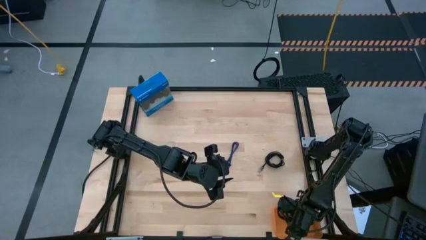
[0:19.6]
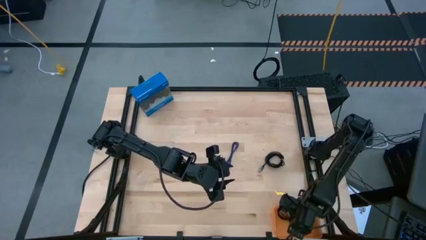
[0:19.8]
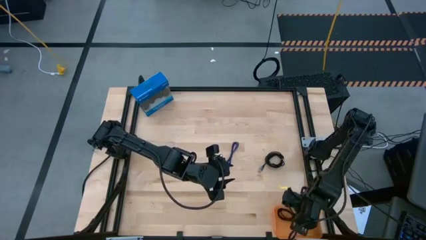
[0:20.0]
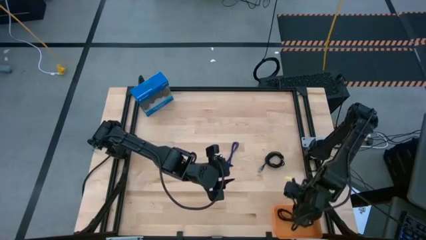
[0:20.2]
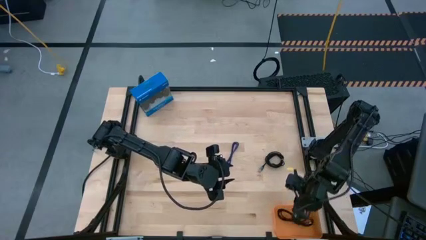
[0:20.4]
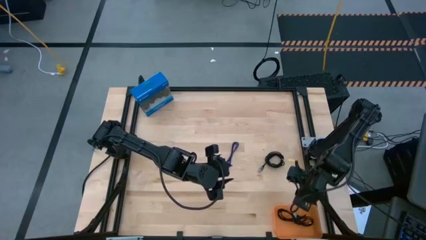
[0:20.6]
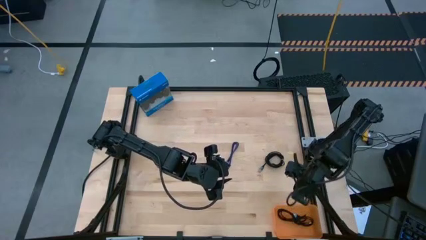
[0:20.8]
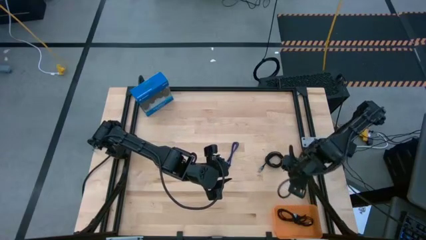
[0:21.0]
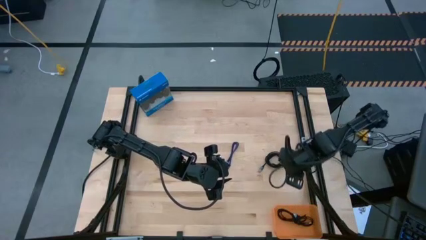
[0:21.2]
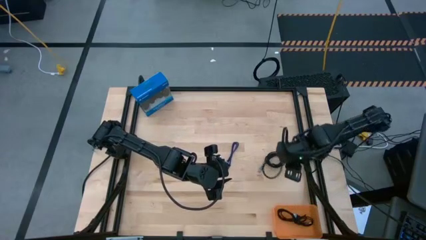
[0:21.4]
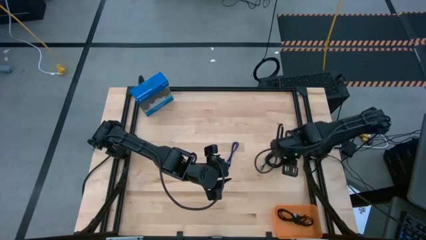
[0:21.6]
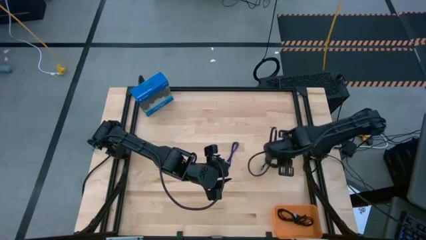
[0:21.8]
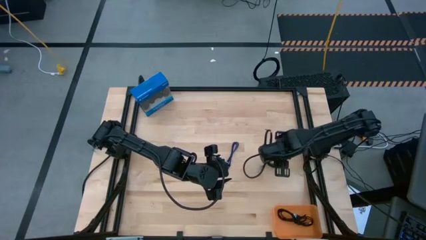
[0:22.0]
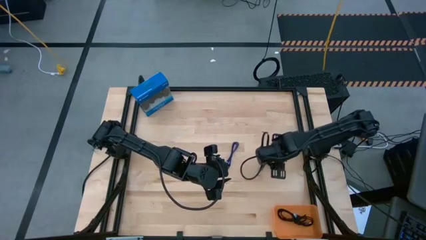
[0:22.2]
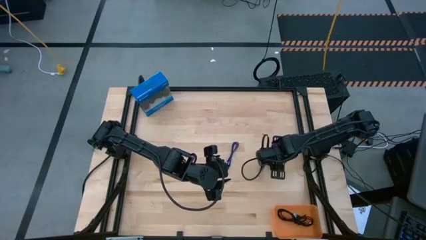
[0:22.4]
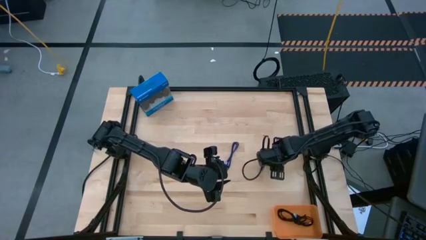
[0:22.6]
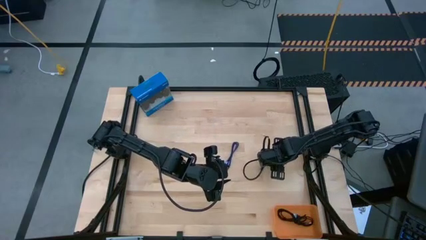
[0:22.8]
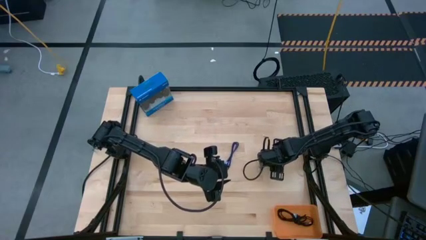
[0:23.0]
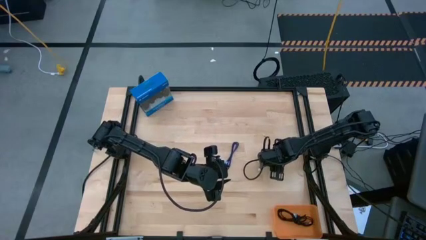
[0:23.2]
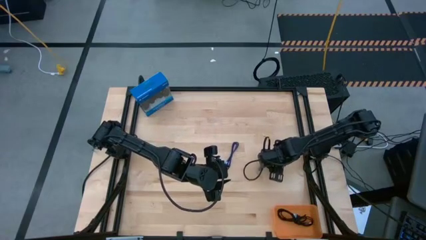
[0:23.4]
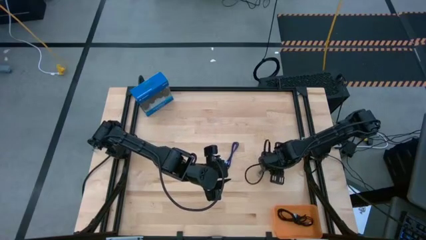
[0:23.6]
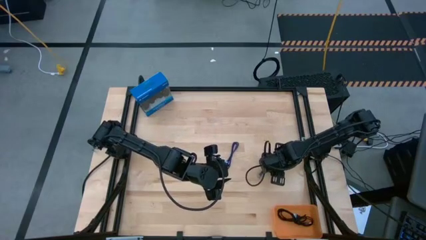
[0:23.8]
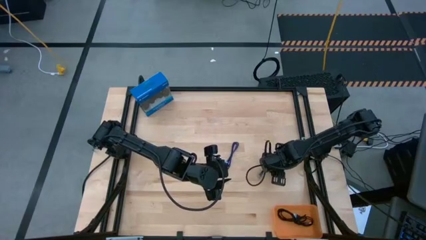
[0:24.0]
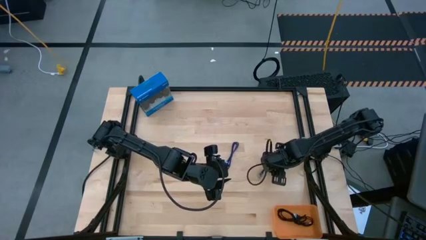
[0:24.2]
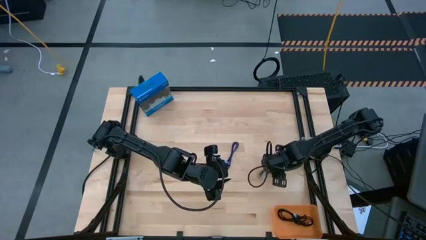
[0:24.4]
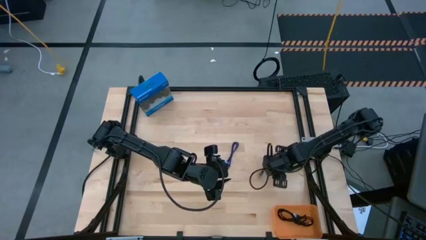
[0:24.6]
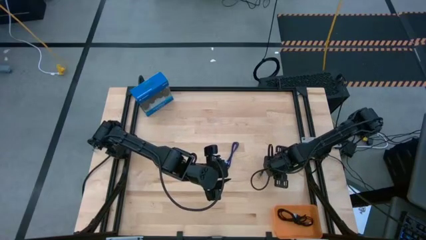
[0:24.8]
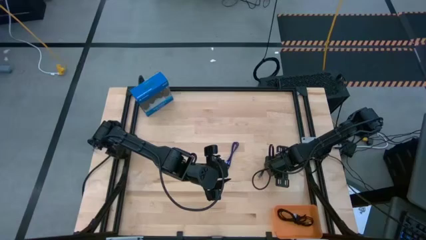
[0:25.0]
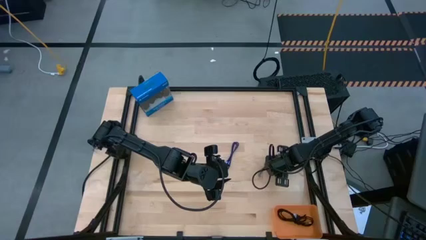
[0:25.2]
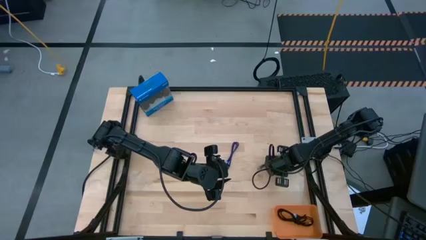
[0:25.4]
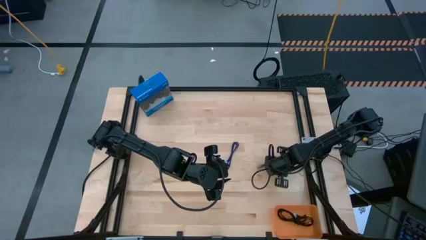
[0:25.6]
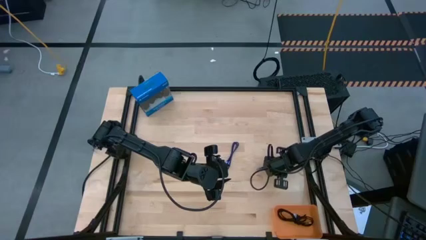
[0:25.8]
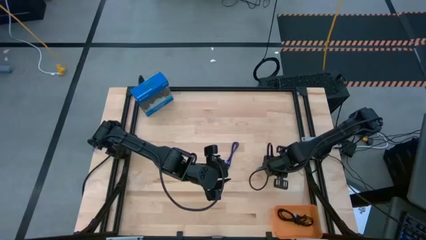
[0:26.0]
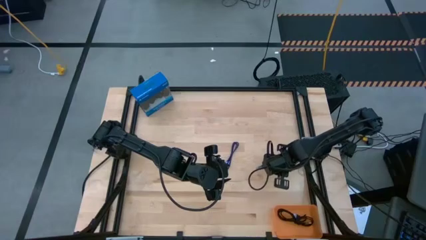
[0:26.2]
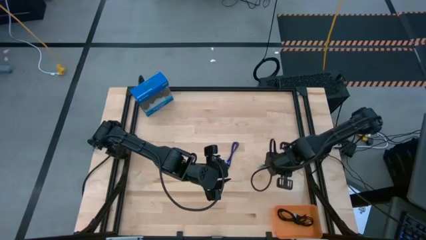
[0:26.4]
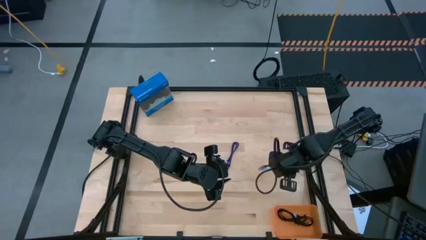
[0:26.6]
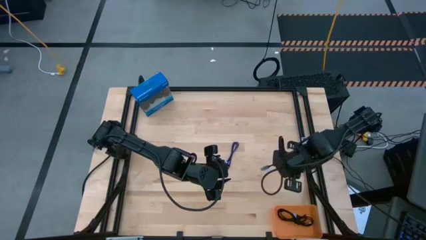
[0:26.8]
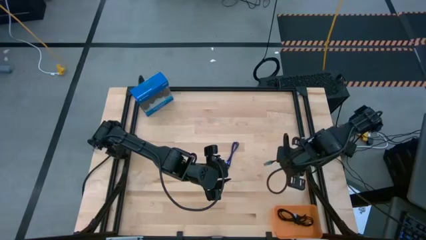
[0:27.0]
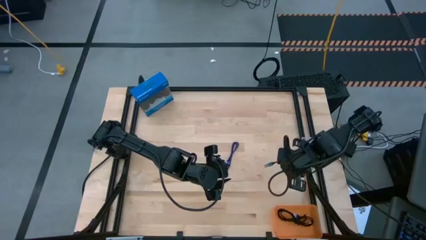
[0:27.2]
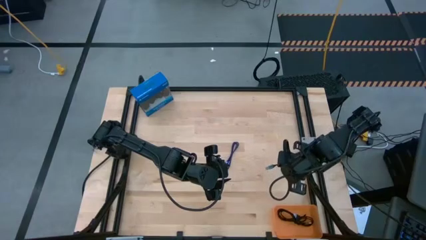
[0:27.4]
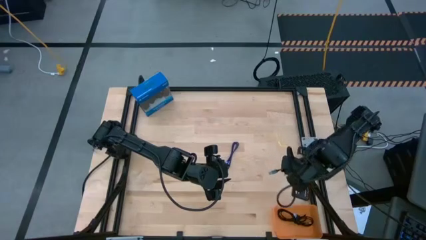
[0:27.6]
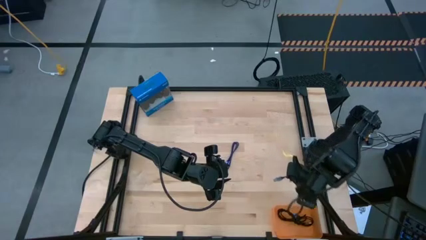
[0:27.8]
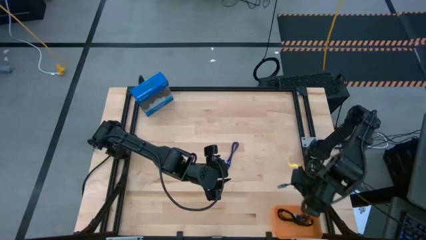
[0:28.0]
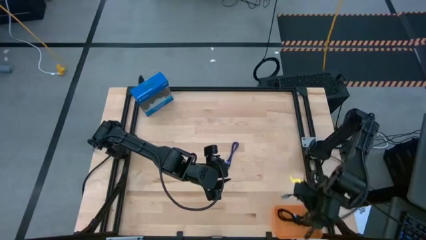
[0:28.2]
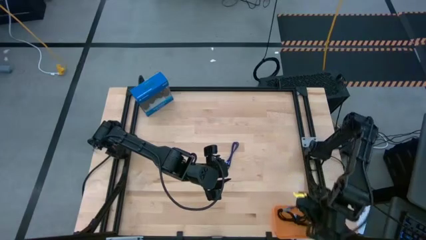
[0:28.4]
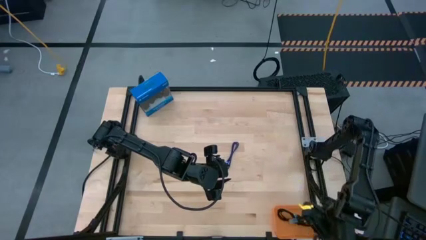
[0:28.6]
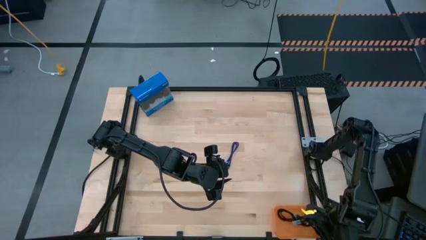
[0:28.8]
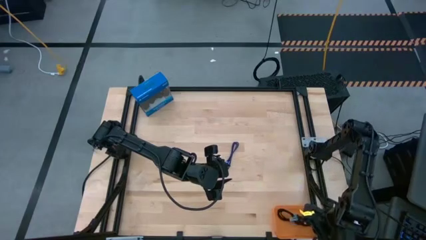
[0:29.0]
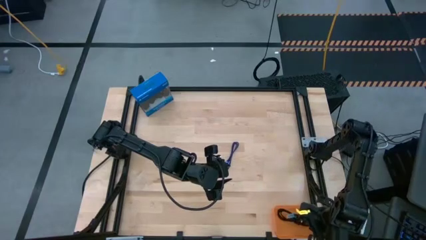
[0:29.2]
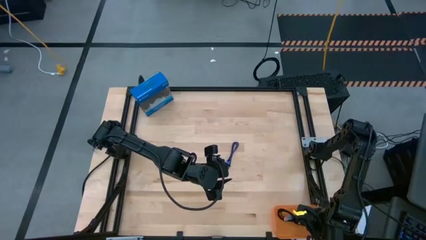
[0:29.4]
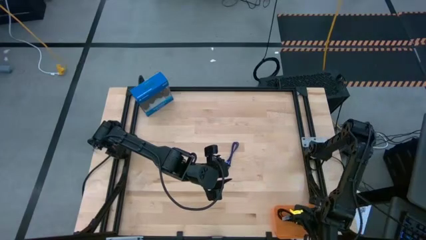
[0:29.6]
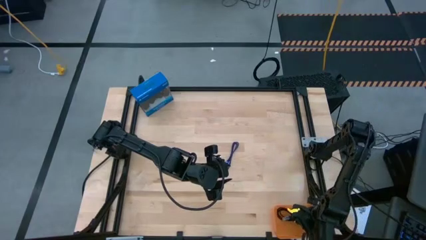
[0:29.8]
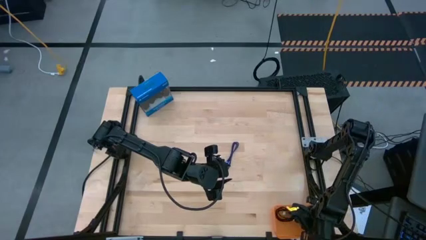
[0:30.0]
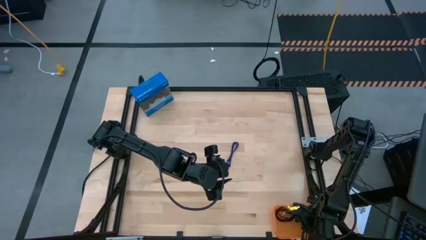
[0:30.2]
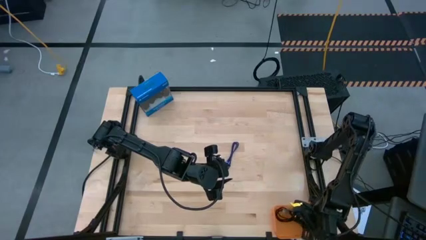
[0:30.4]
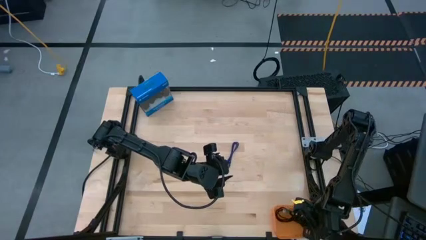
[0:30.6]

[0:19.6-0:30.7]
Task: Pick and place USB-C Cables
Put the black charger cable into the orange bin

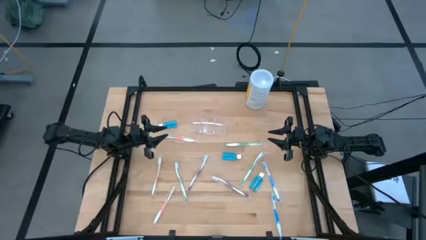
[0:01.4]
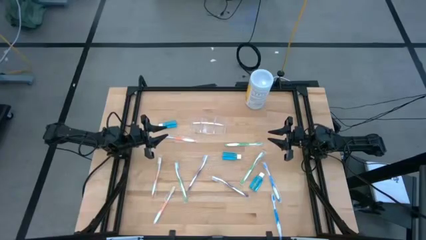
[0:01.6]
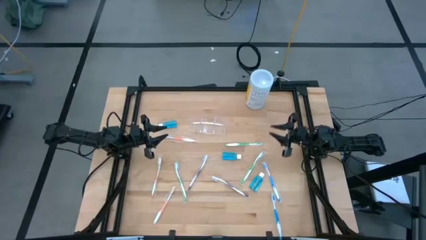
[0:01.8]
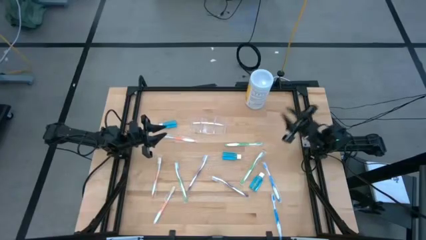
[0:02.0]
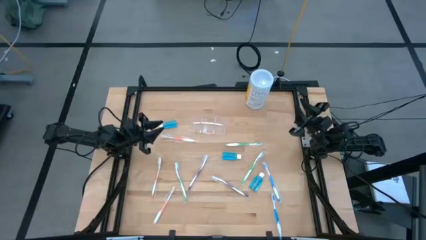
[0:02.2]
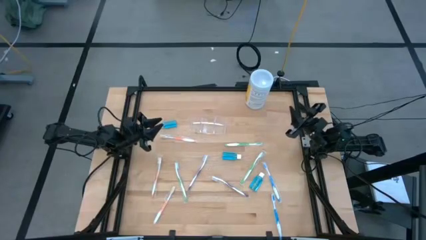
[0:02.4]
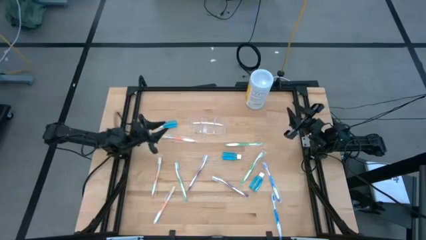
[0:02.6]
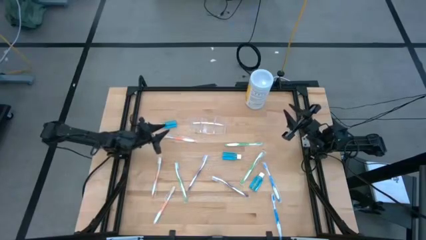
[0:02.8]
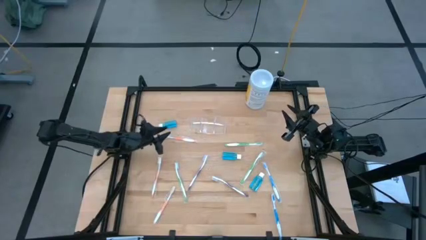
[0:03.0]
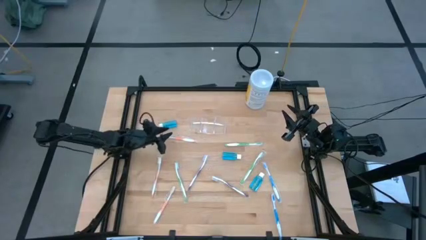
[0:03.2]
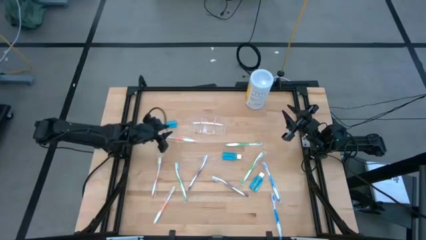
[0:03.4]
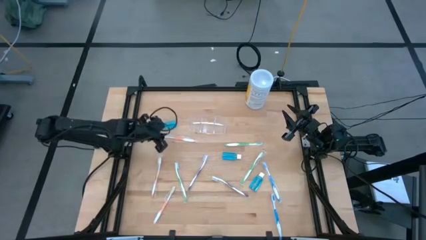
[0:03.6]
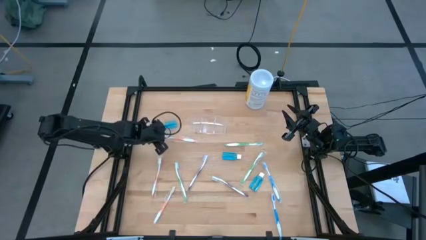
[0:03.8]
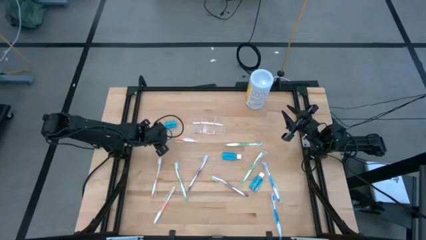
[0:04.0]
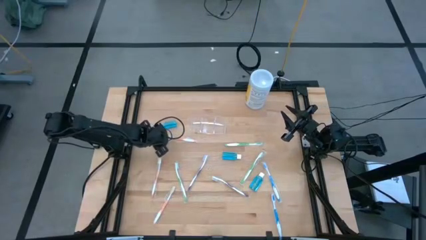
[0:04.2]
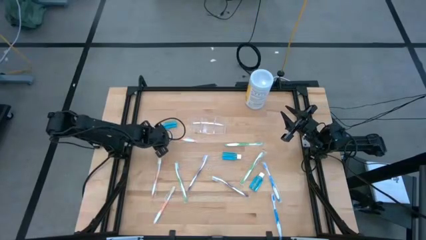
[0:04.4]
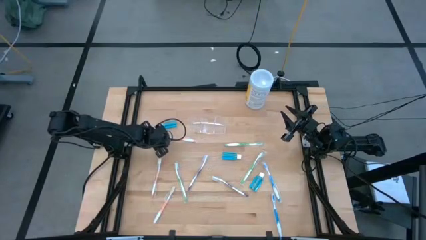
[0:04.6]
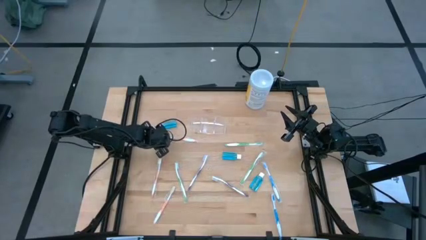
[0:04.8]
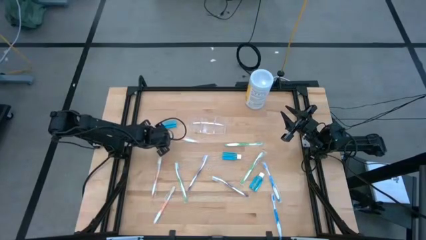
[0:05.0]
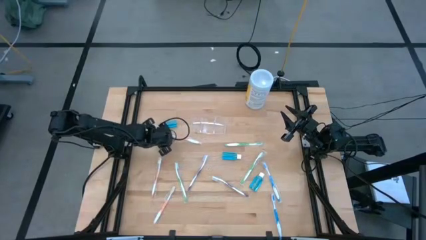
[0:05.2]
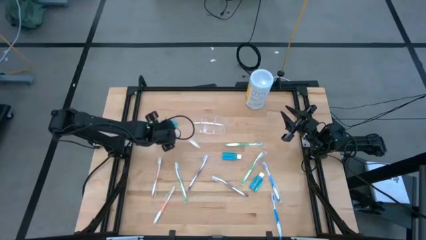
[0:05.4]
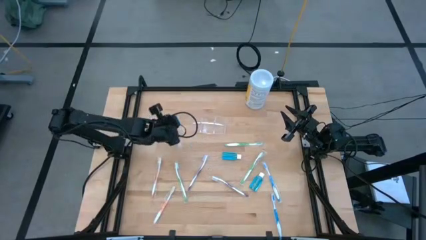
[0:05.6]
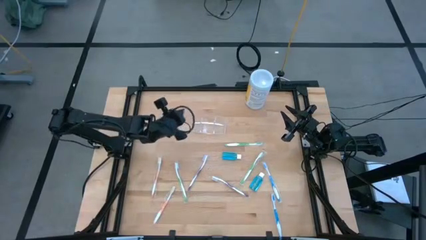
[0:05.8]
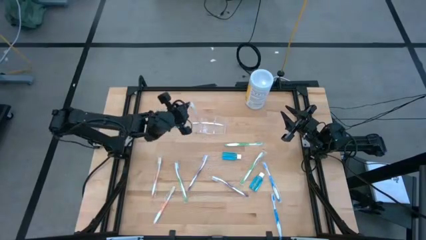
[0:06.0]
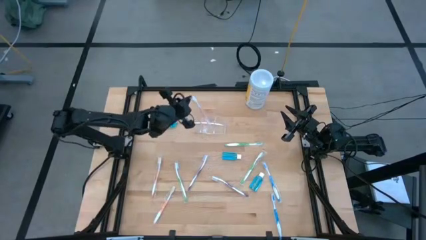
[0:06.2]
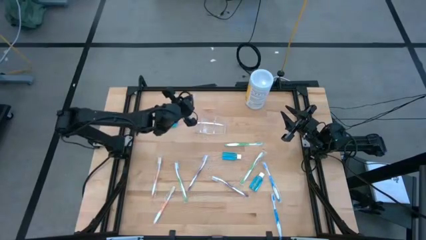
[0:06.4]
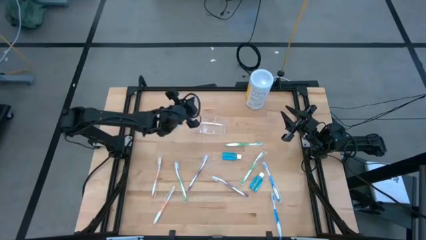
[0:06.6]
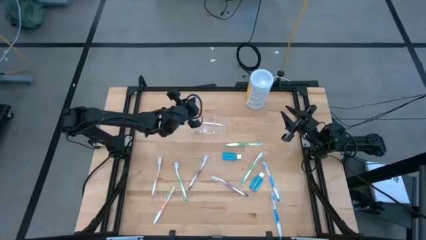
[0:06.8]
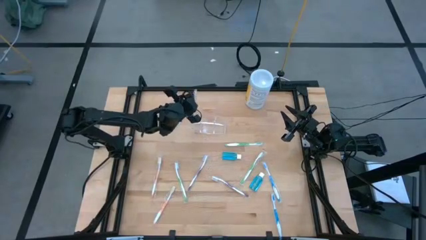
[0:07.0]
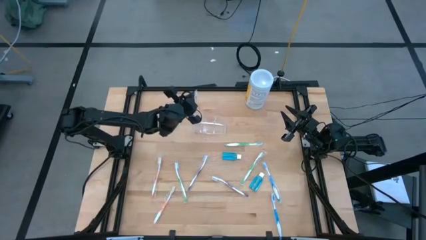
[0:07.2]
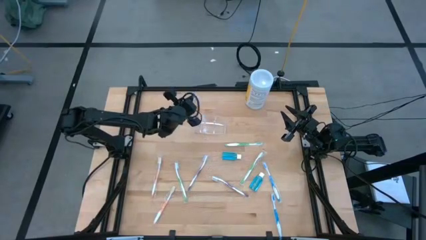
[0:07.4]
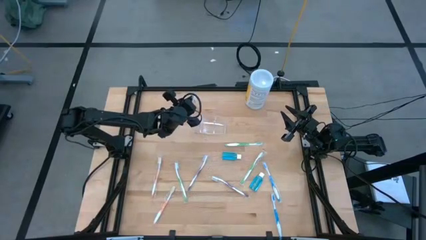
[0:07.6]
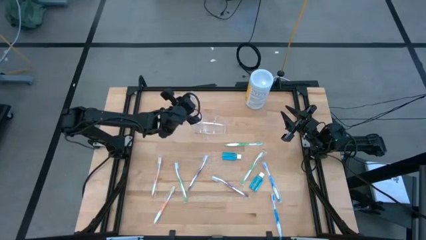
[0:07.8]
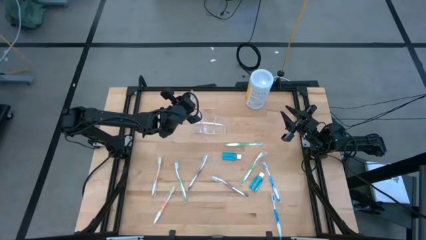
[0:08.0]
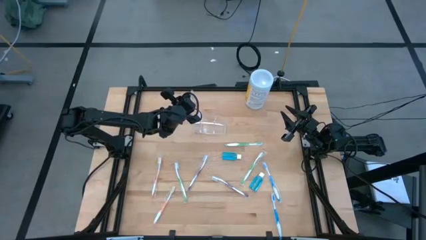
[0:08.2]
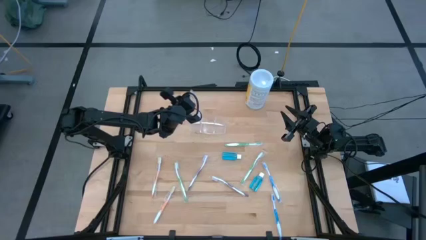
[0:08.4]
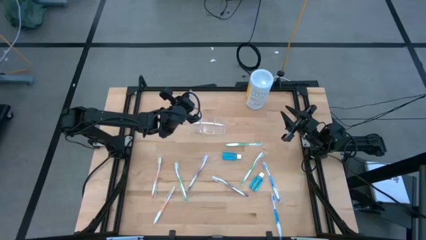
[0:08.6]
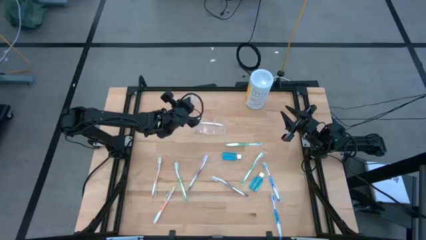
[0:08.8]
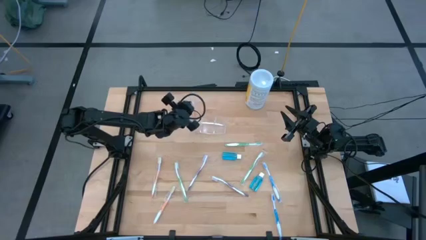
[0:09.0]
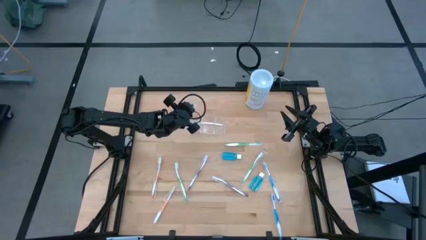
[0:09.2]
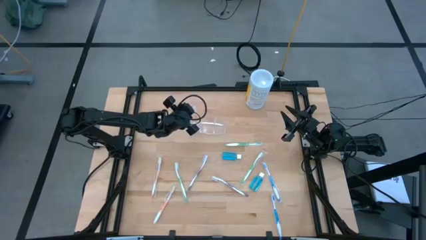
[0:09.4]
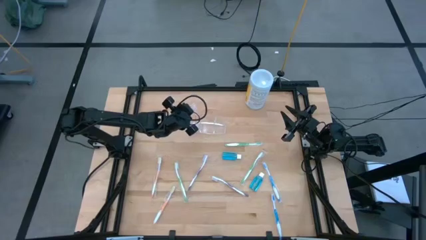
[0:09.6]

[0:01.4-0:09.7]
Task: Pick & Place toothbrushing station
Put the top right orange toothbrush into the transparent organizer
